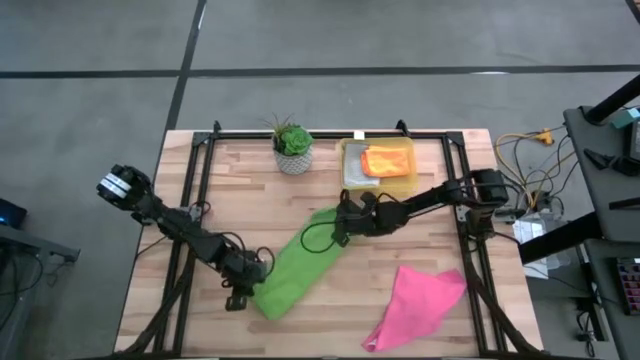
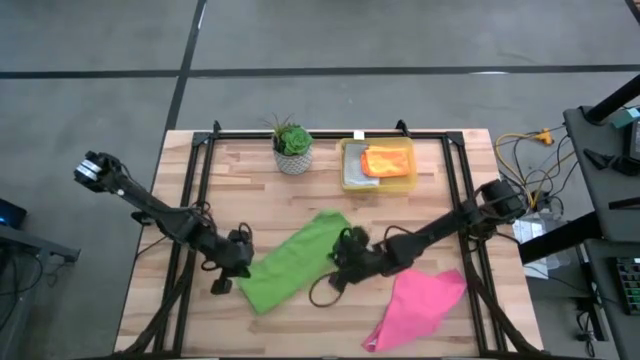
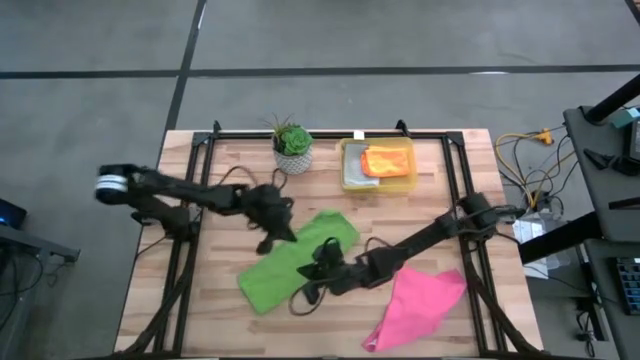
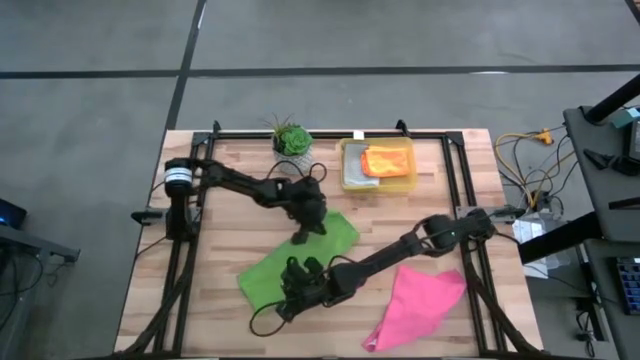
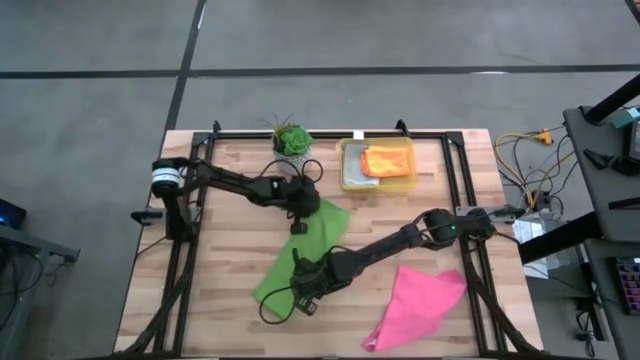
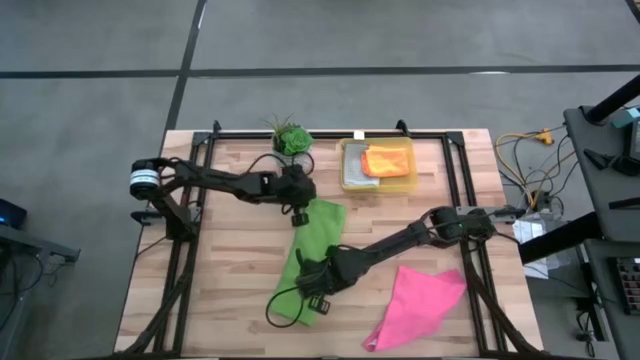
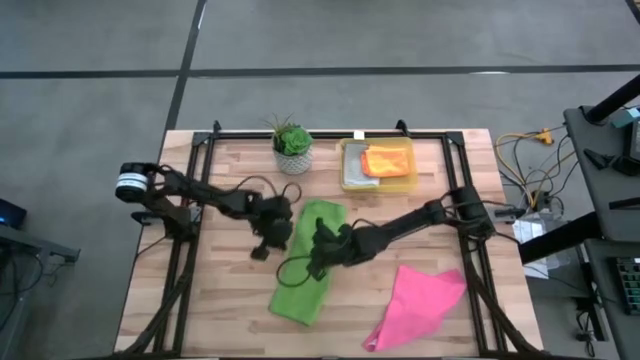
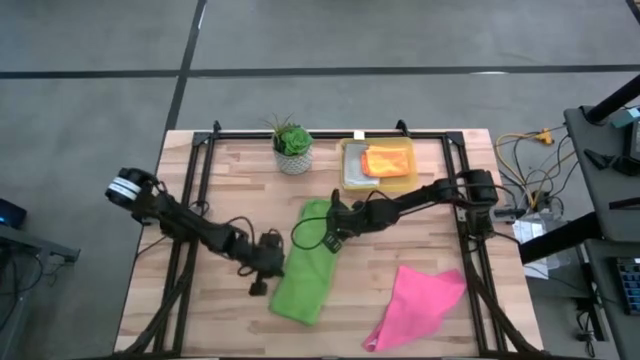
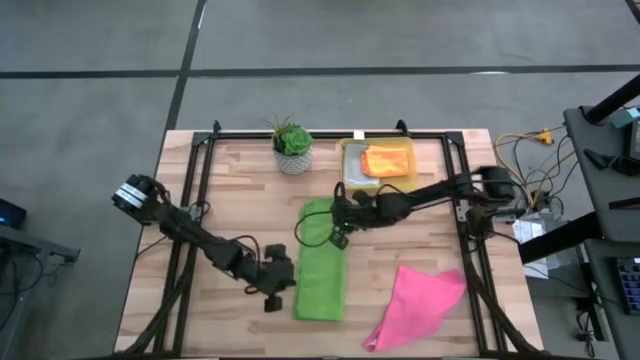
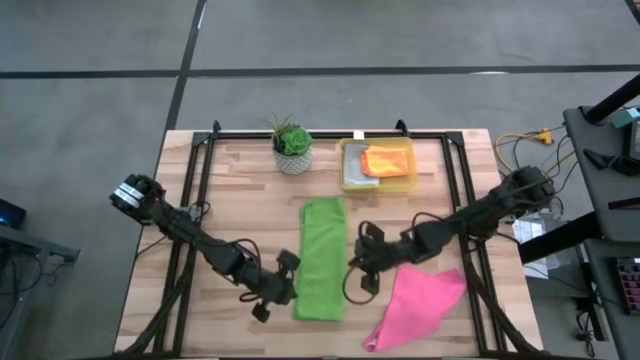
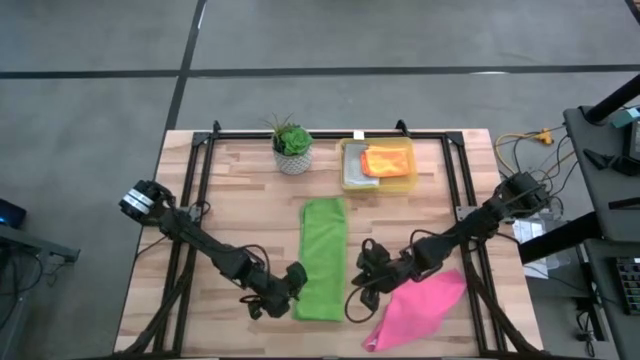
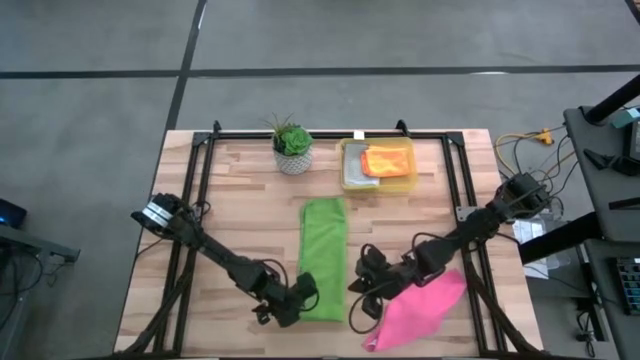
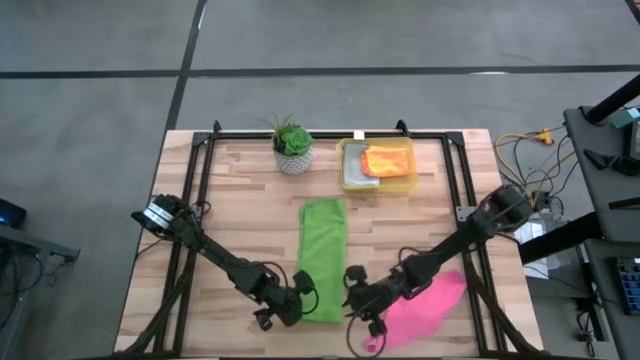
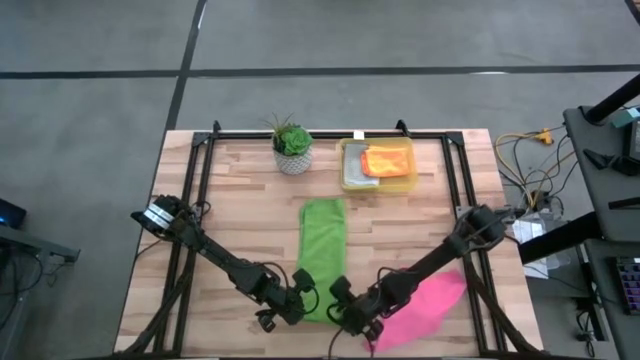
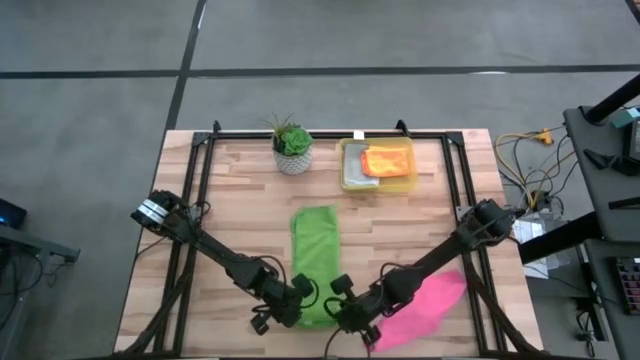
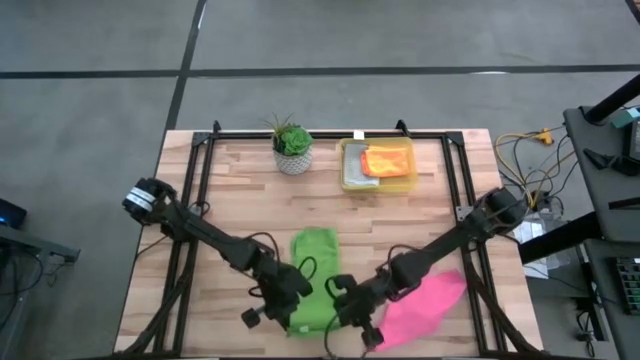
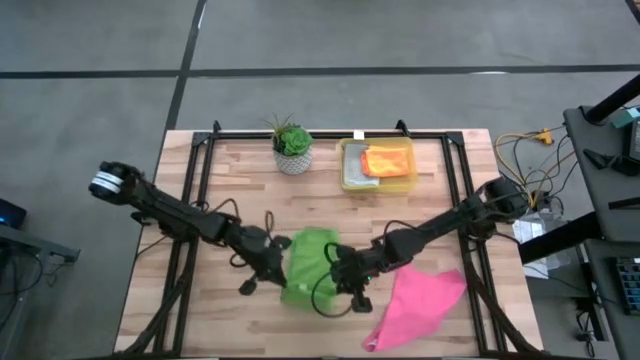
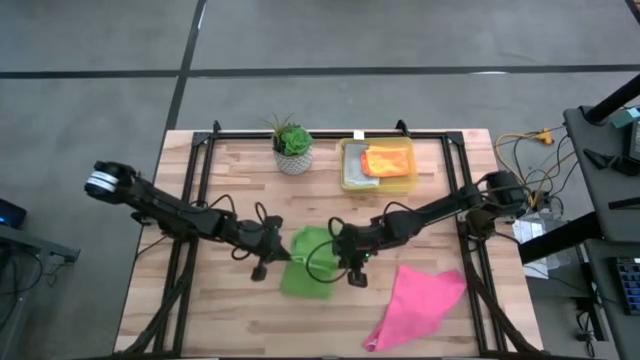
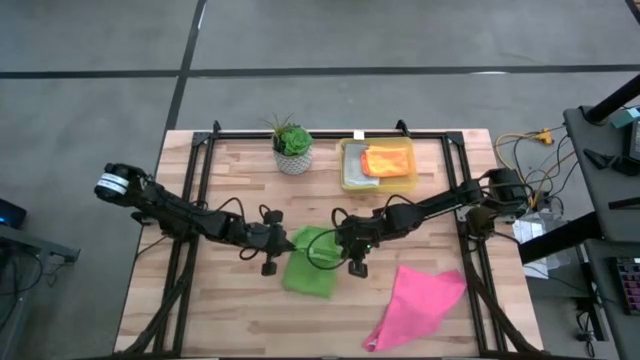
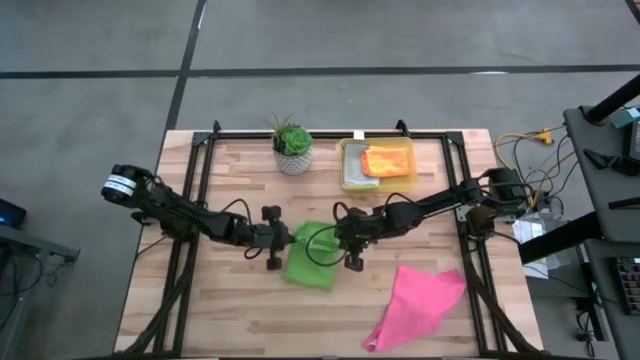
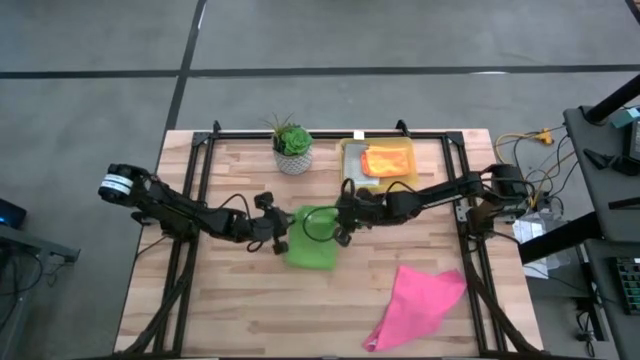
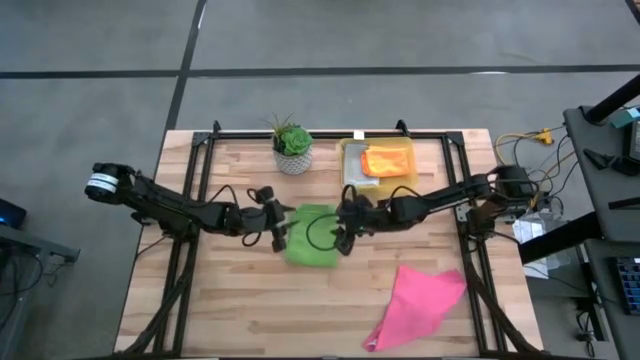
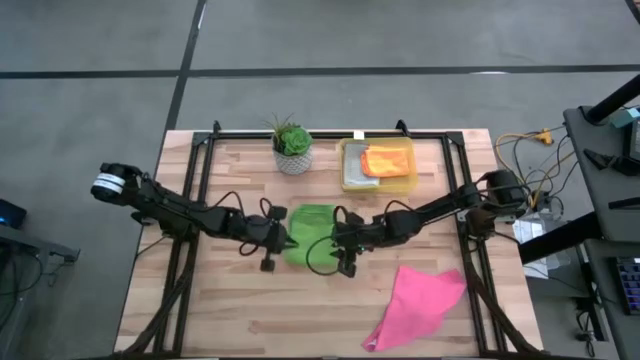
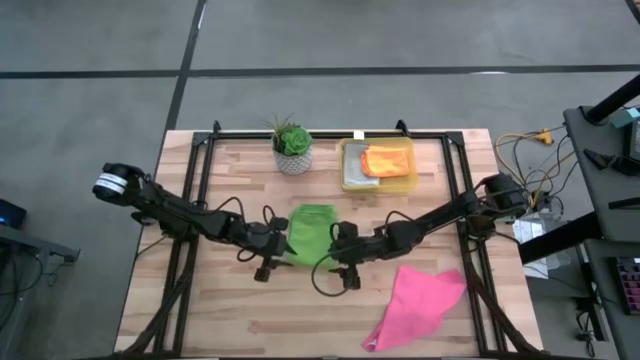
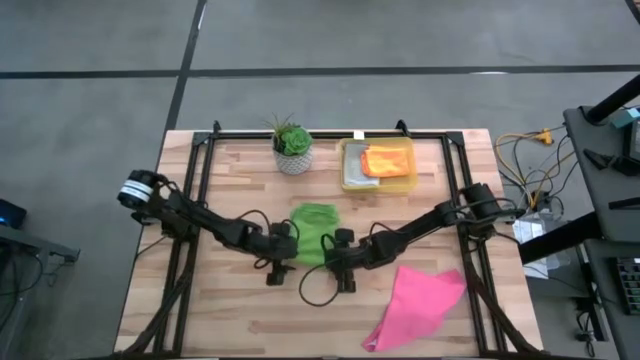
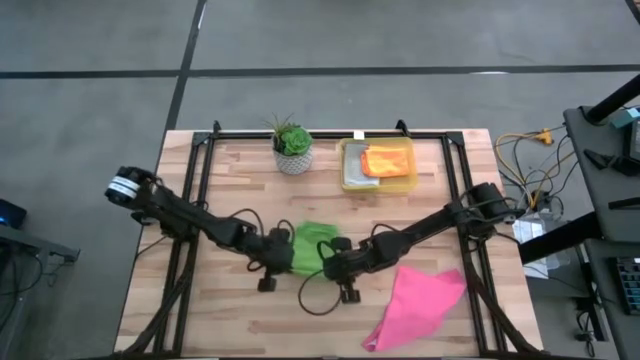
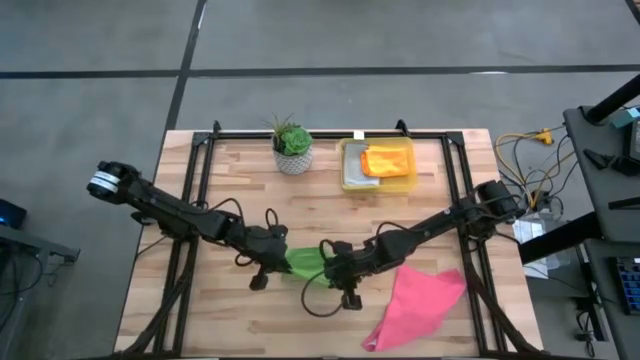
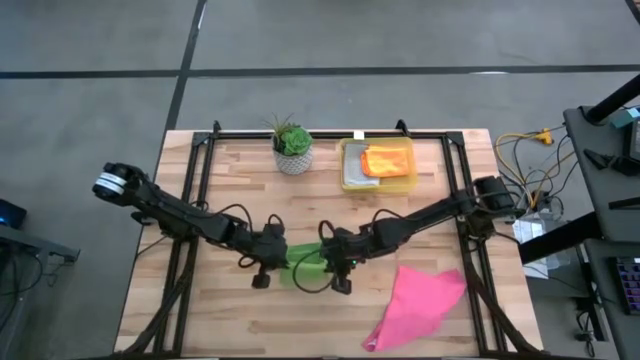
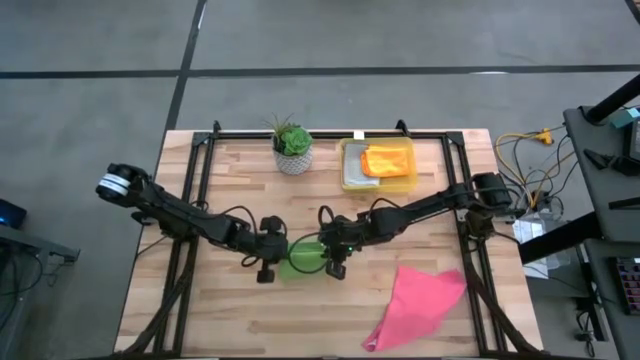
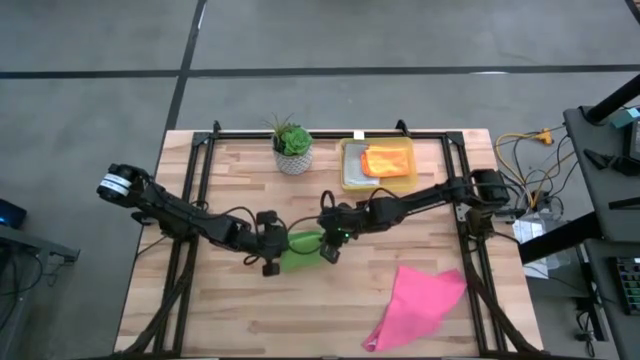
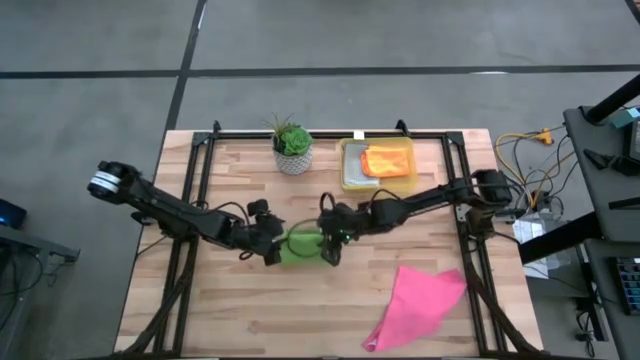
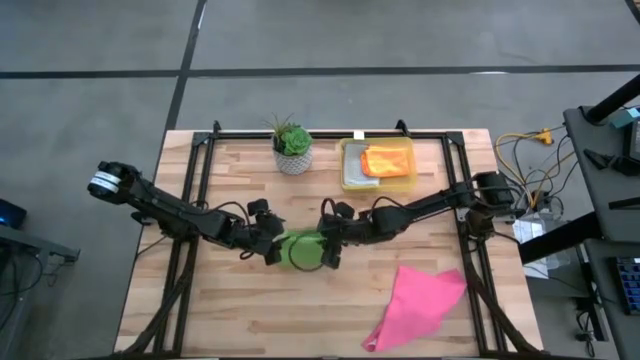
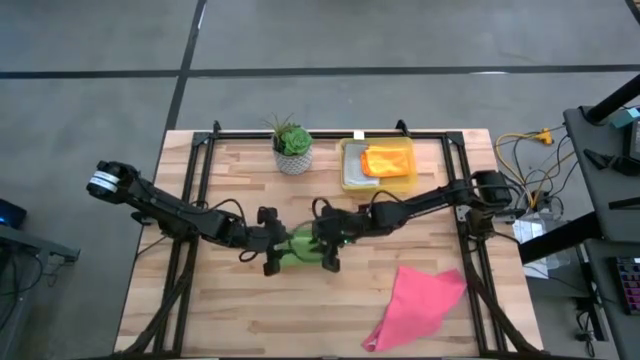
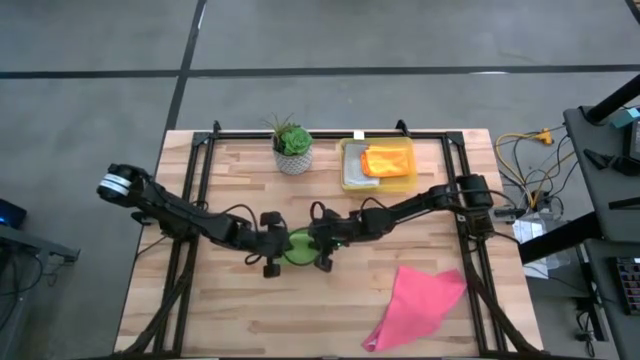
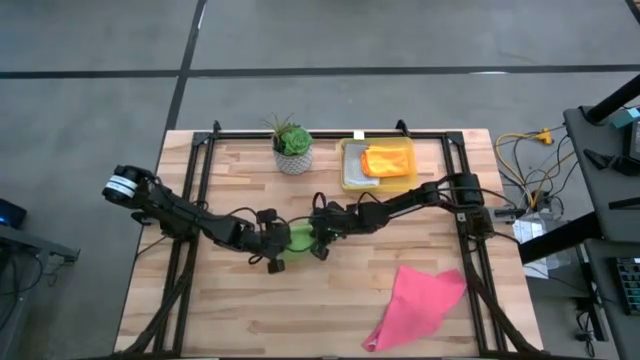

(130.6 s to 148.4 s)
Task: Fold microfiber towels
Fold the green microfiber cloth

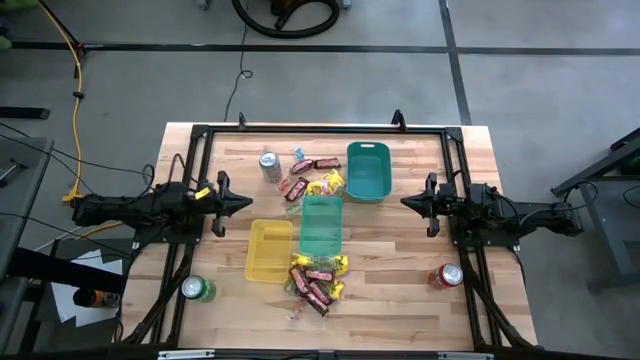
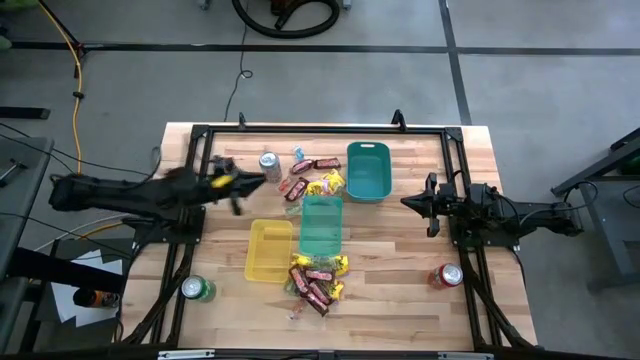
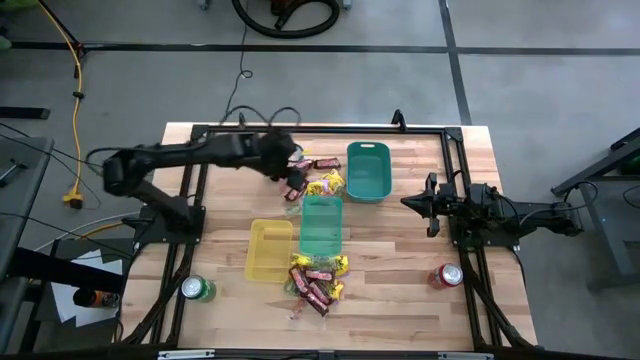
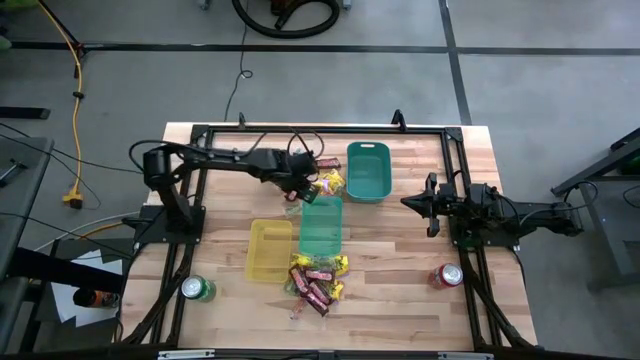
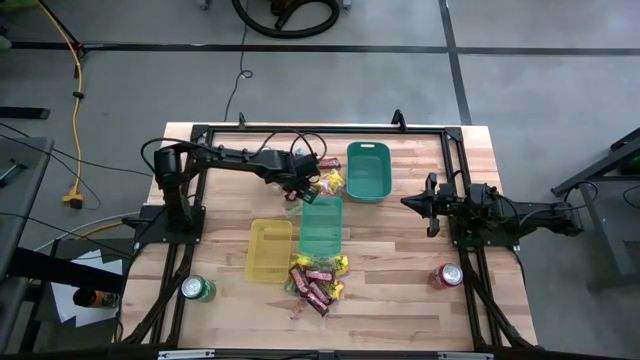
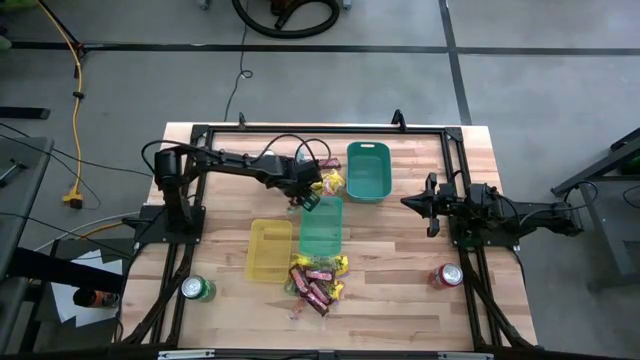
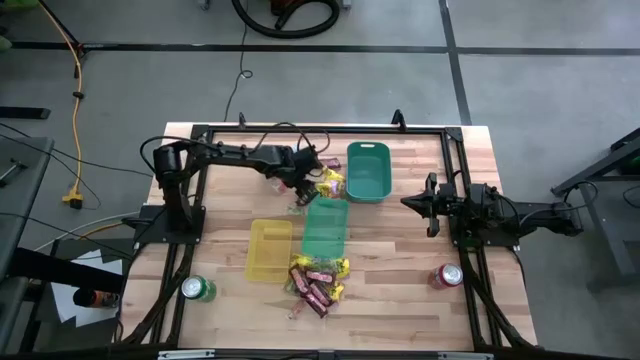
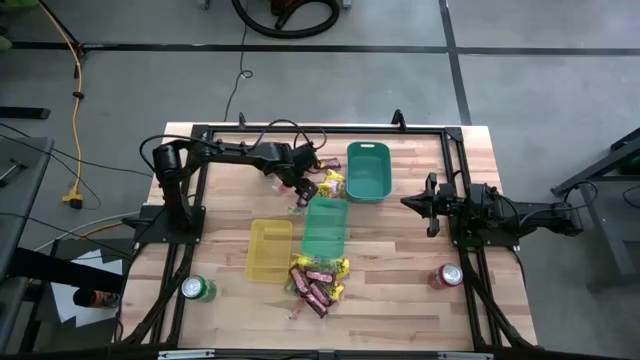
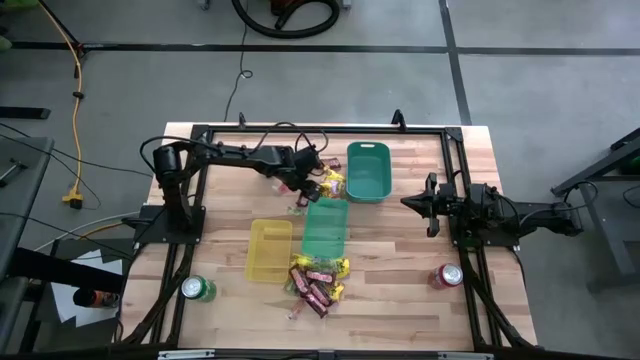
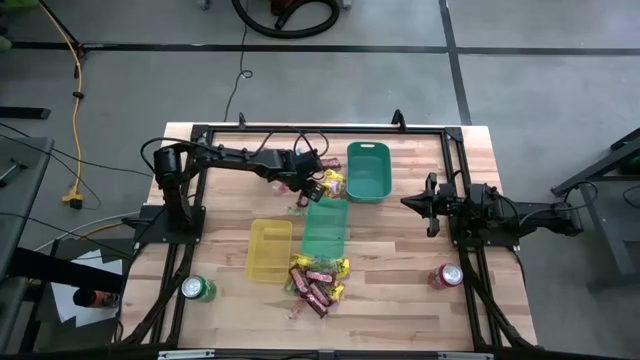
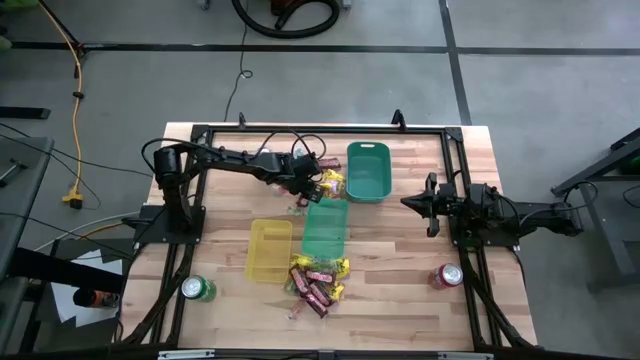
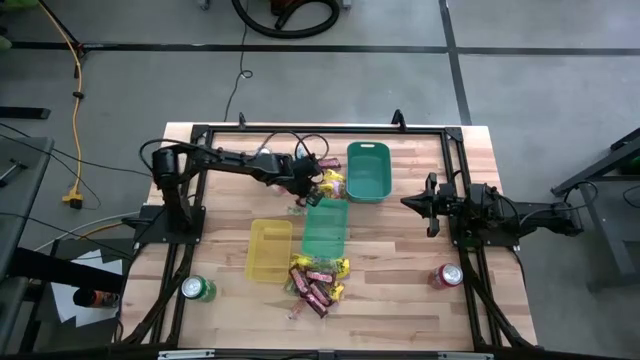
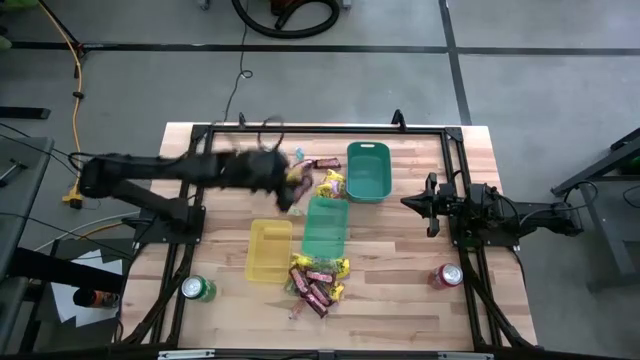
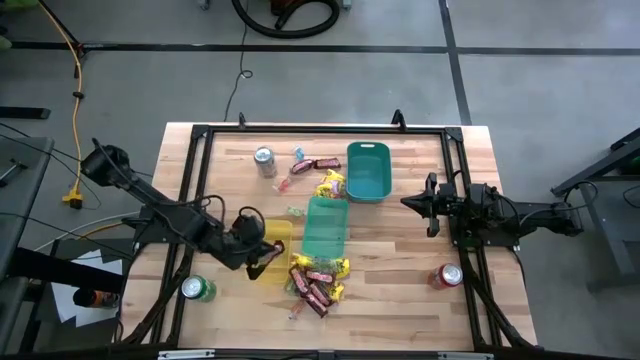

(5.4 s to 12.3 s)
Task: Sort candy
Put the brown chocolate bar into the yellow bin
